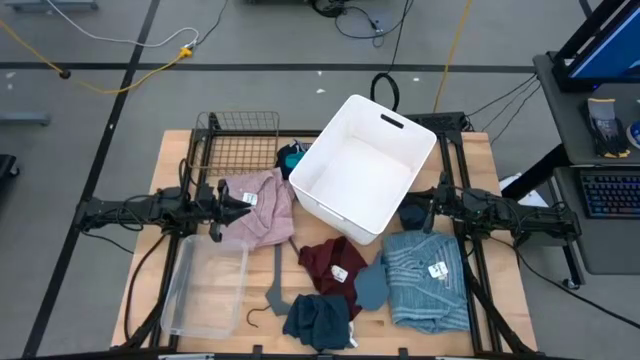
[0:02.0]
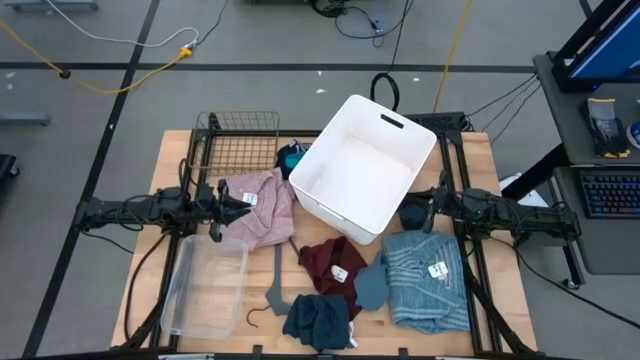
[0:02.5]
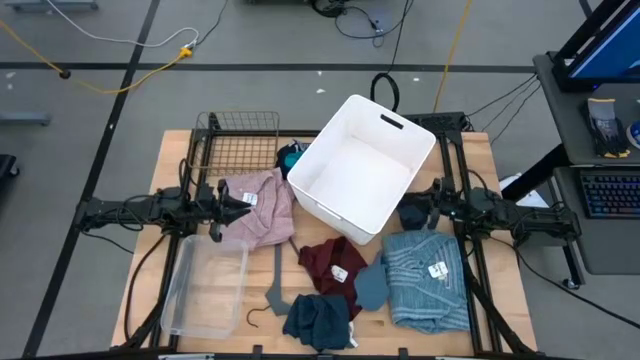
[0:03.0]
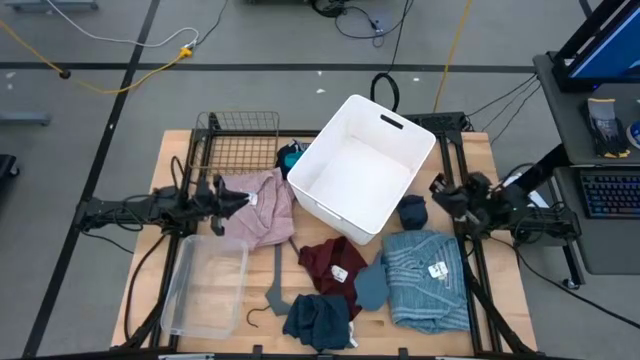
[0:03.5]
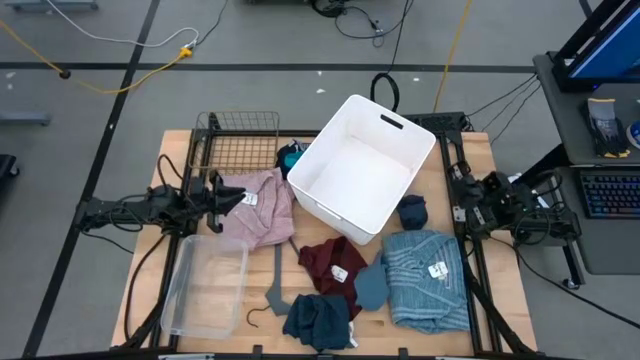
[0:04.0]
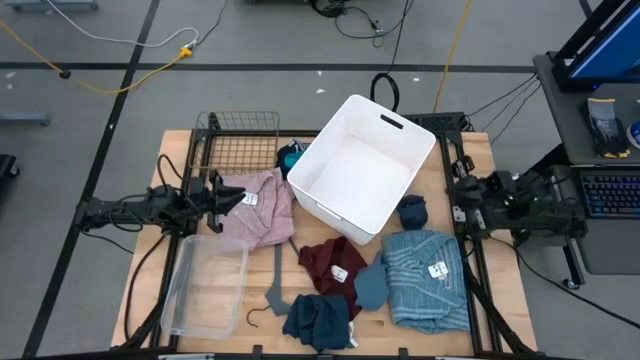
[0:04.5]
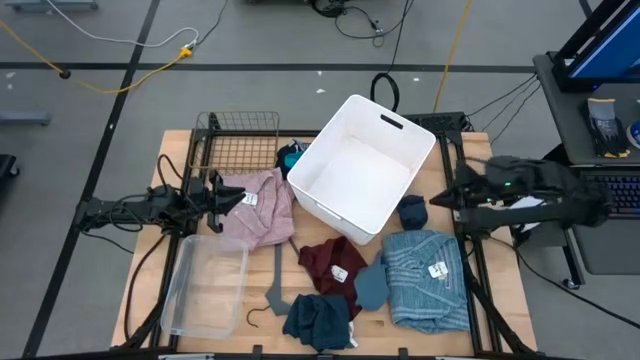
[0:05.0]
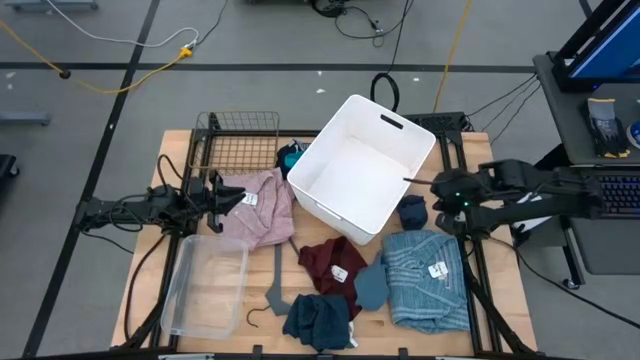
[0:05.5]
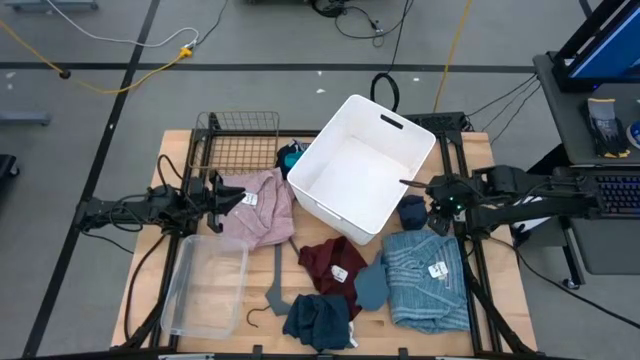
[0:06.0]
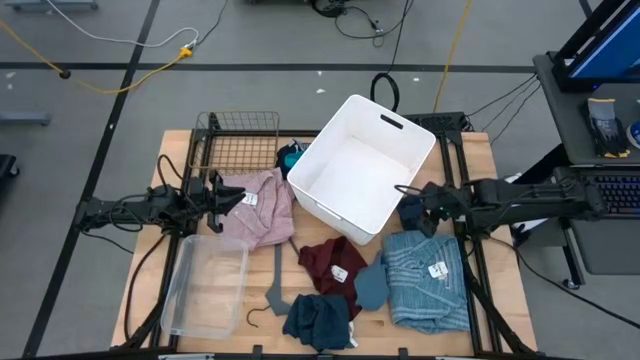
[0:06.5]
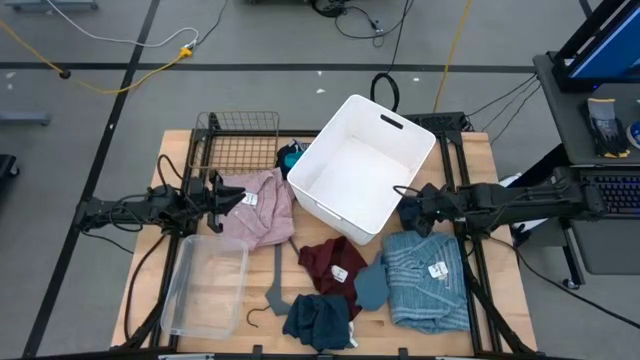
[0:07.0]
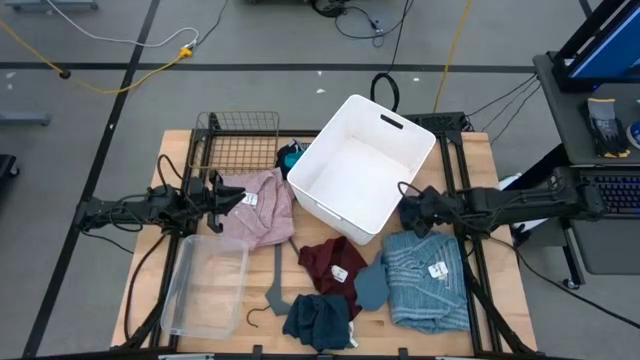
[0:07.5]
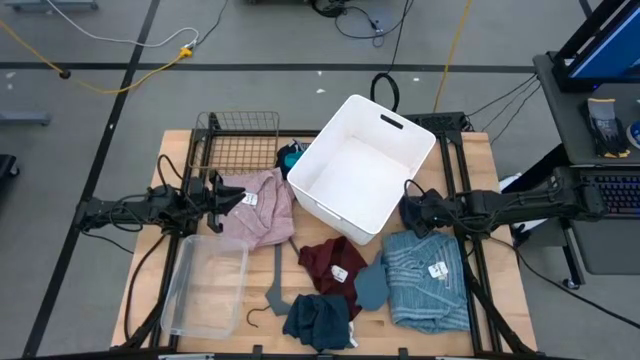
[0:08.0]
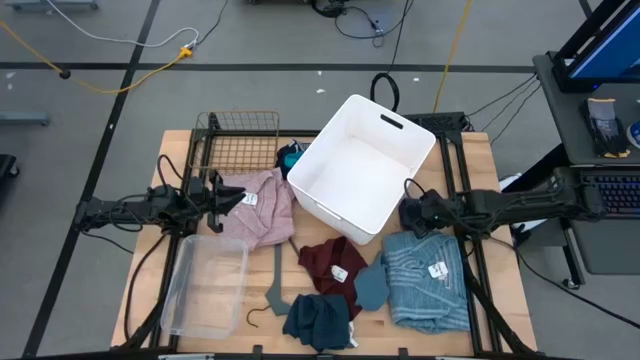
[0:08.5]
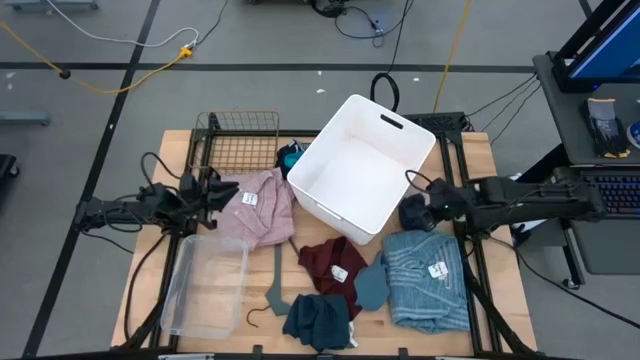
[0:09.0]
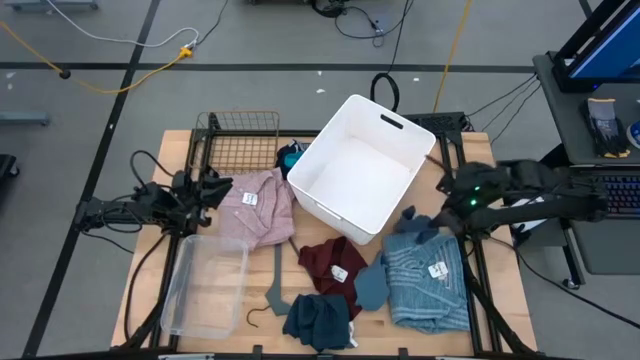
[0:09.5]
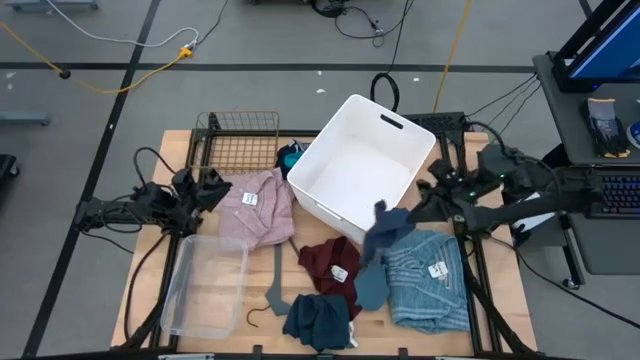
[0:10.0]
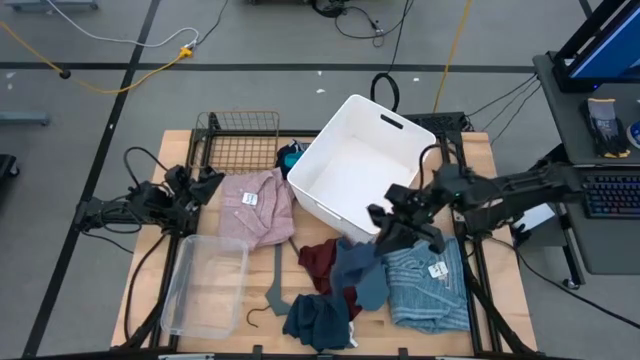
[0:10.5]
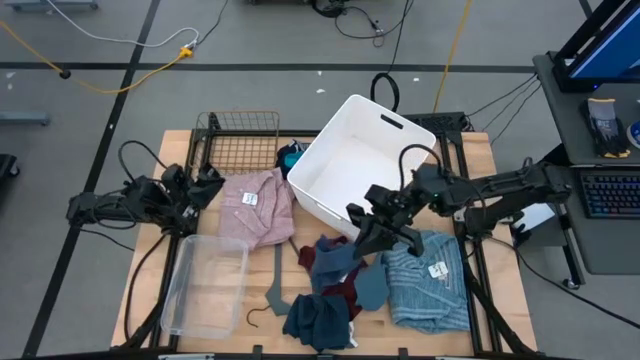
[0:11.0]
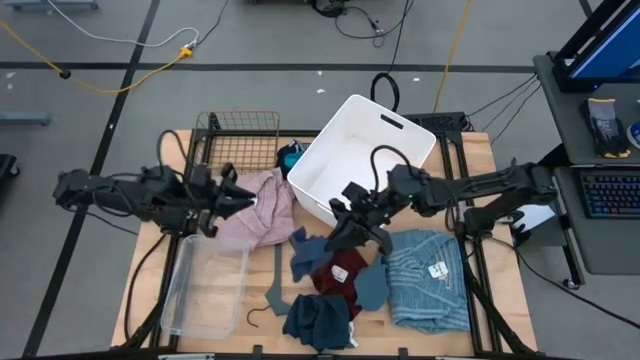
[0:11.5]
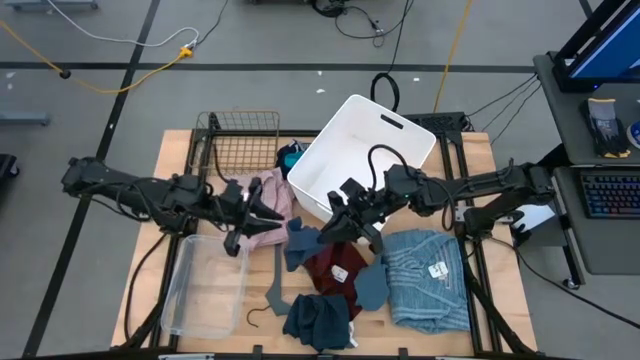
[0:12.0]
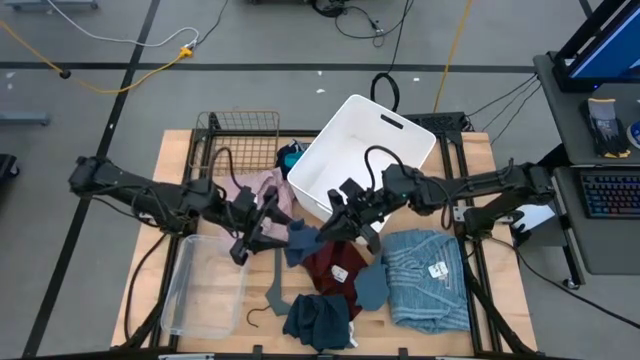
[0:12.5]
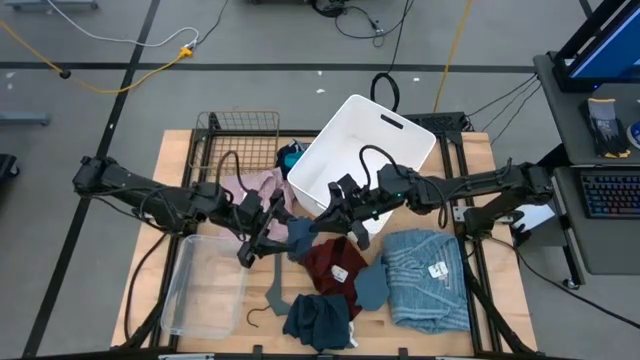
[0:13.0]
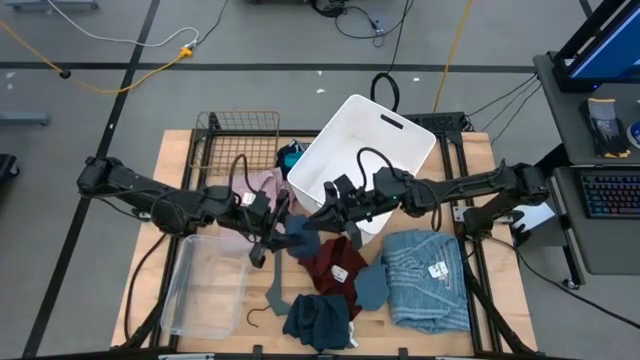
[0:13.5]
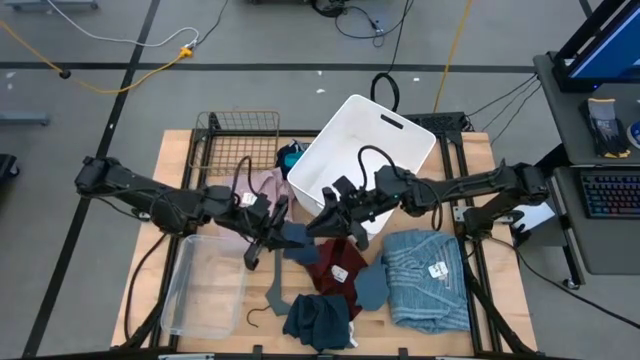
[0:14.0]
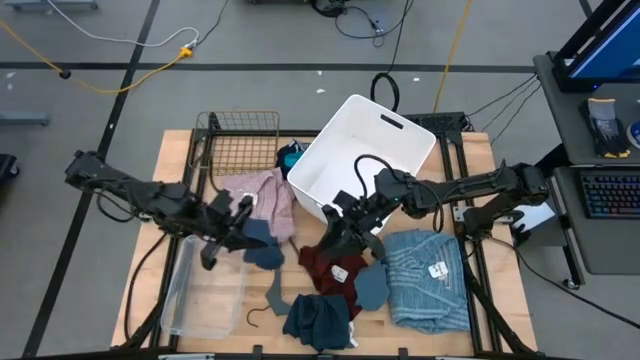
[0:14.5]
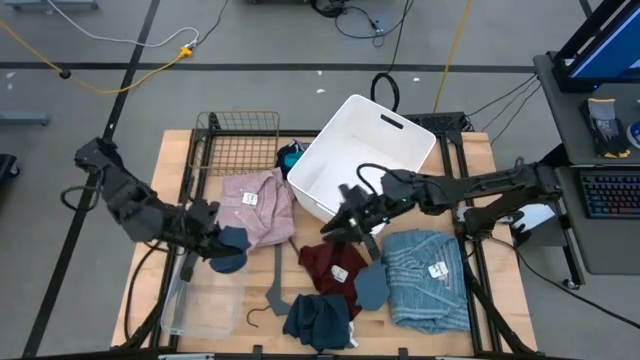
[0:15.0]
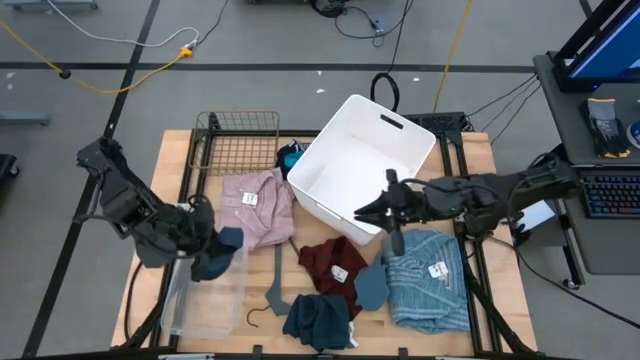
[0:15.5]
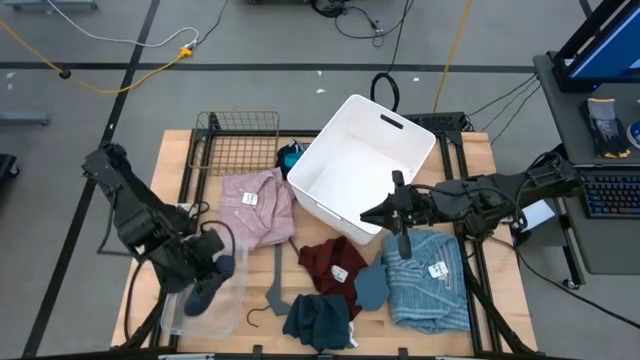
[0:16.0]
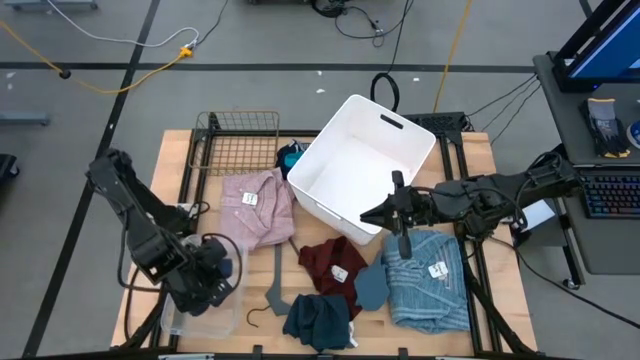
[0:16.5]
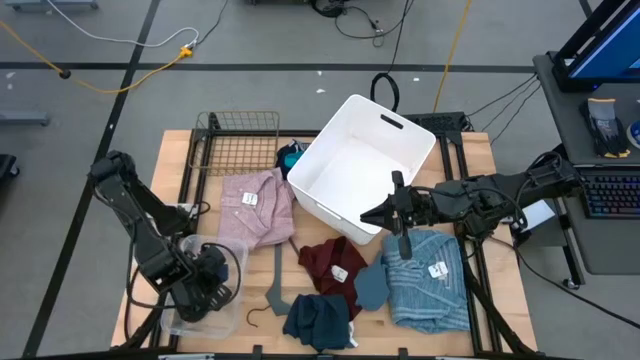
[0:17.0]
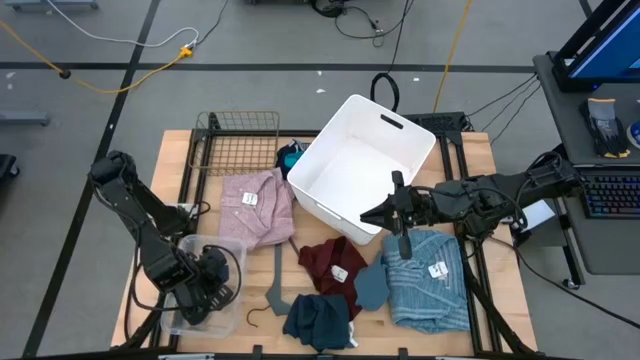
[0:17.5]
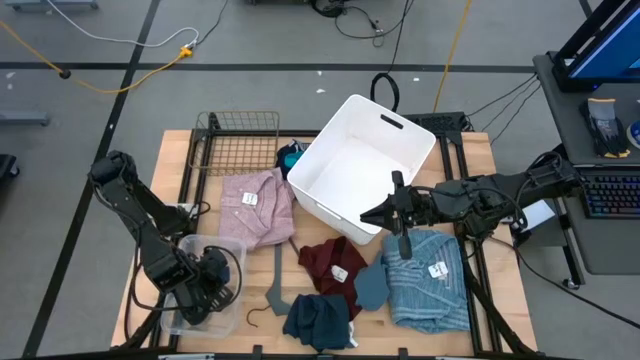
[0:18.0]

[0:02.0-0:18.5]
Task: Pick & Place Cloths
Put the dark blue sock into the transparent bin

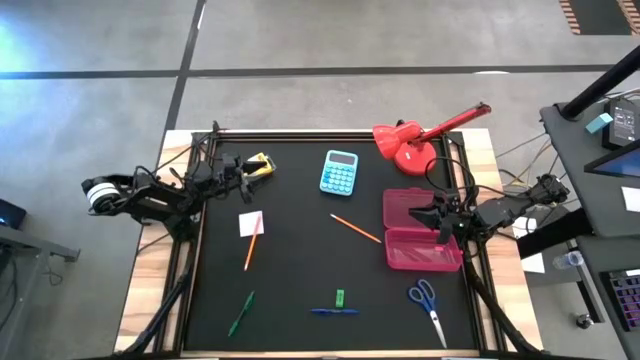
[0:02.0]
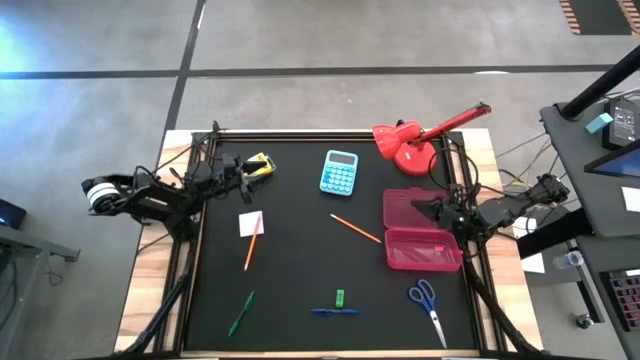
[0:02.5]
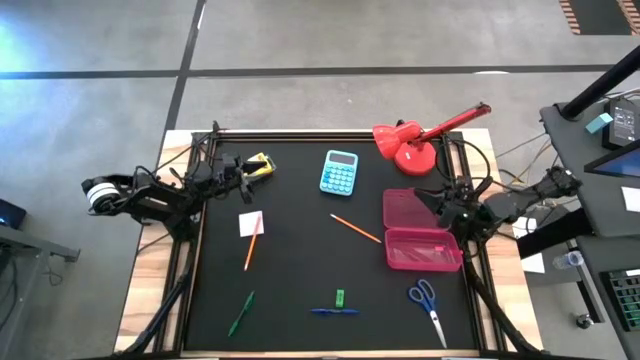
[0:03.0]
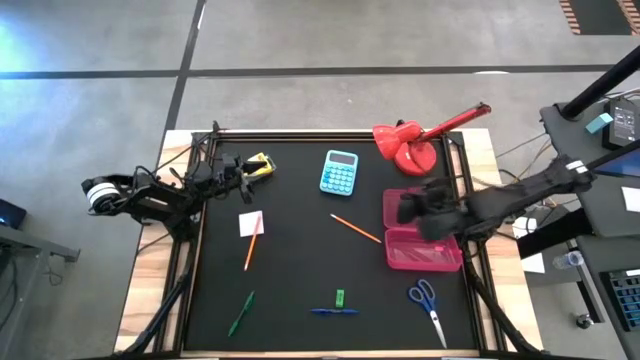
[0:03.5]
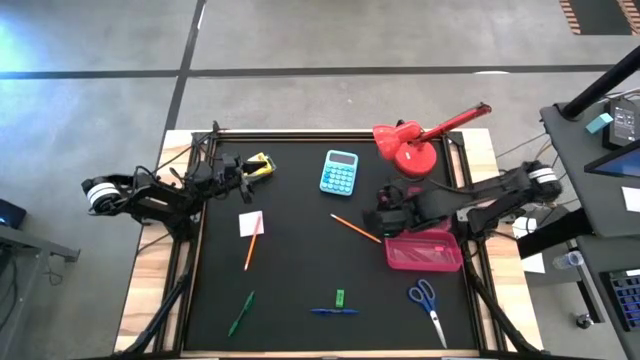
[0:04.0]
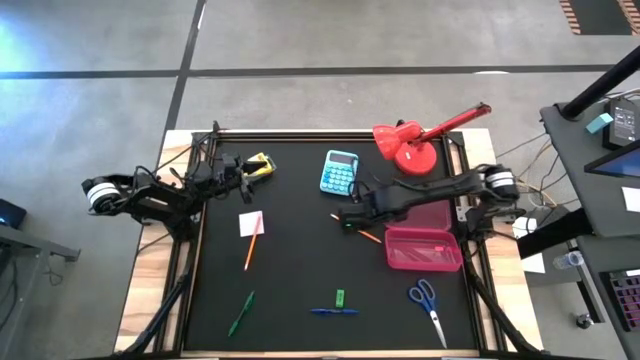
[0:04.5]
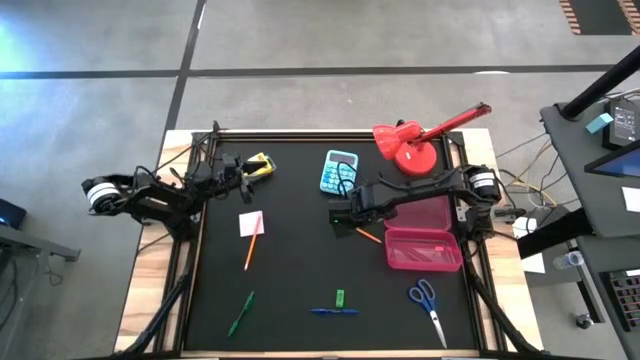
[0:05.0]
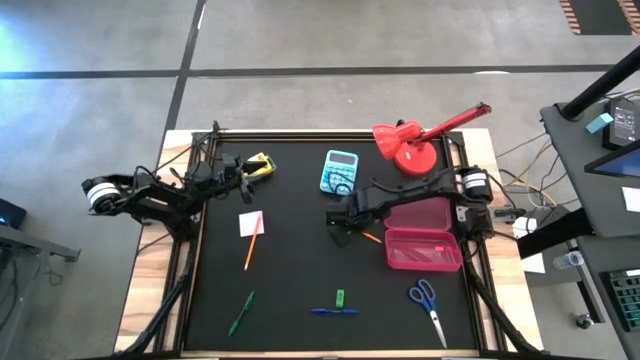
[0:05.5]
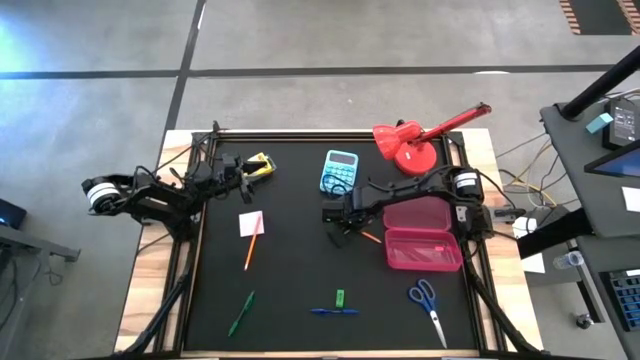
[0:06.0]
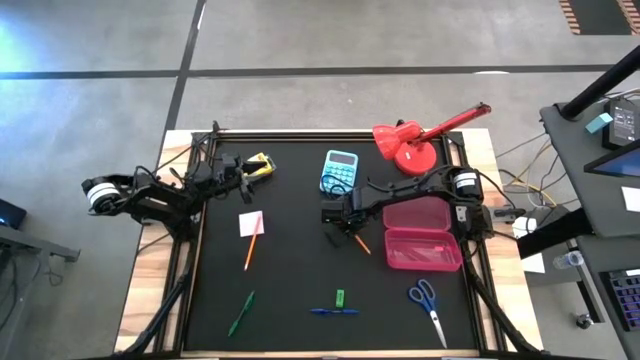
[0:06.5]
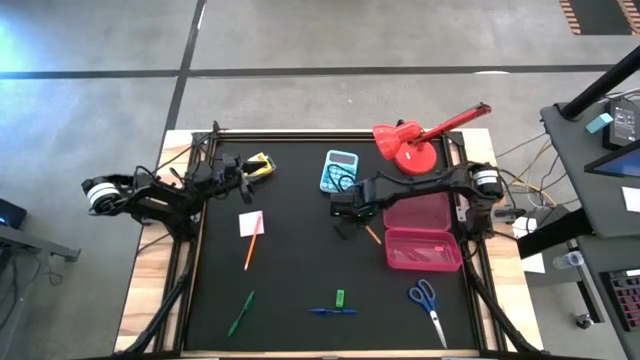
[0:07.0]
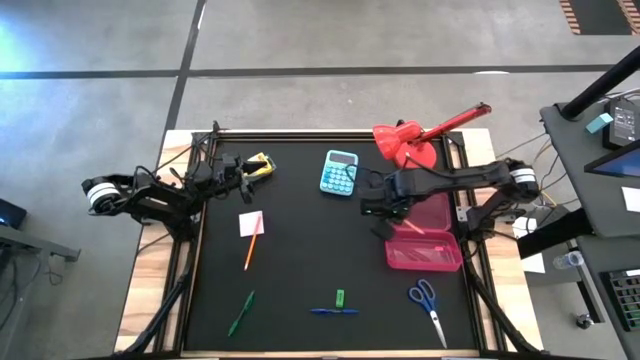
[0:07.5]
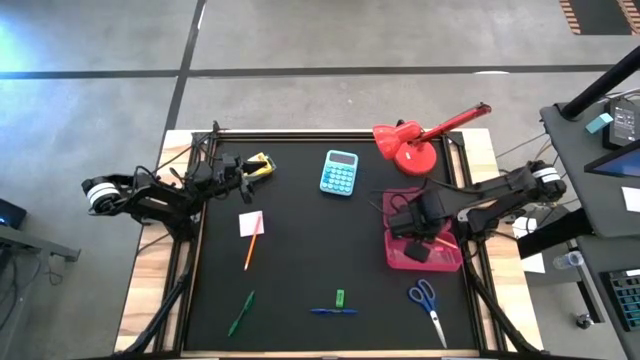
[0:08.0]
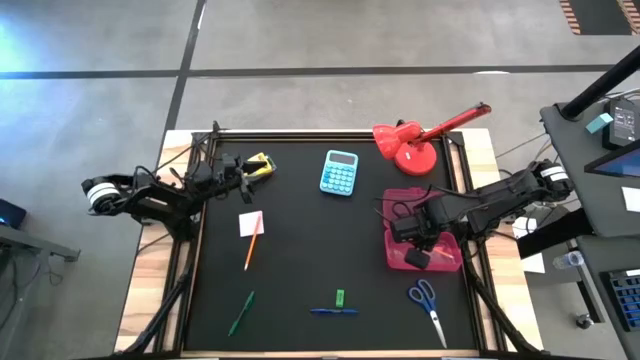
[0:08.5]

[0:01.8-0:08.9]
Task: Pack school essentials
Put the right orange pencil into the pink supply box
